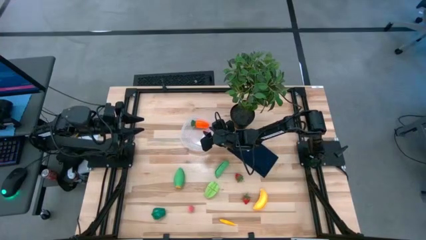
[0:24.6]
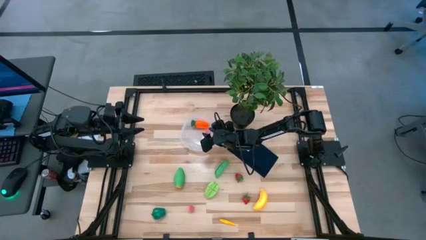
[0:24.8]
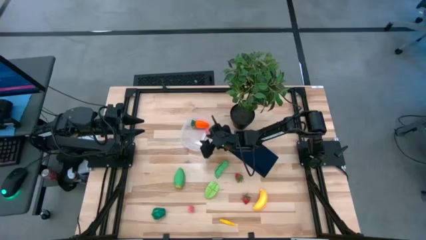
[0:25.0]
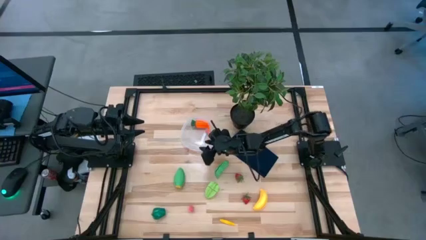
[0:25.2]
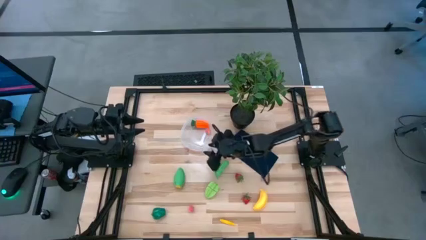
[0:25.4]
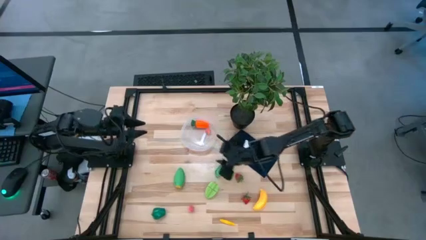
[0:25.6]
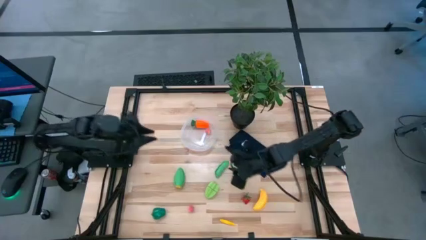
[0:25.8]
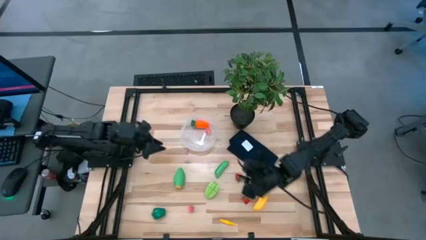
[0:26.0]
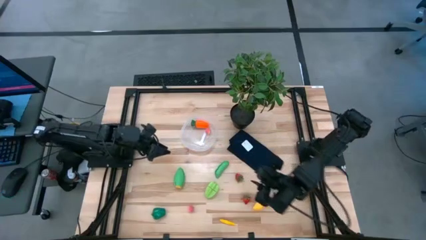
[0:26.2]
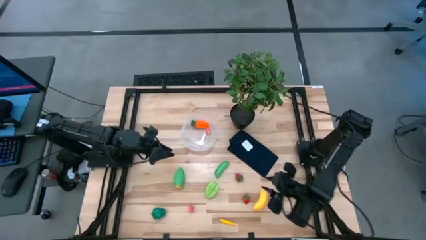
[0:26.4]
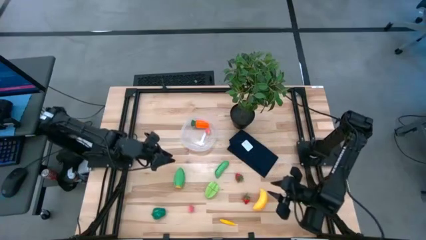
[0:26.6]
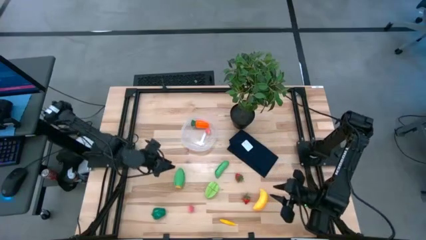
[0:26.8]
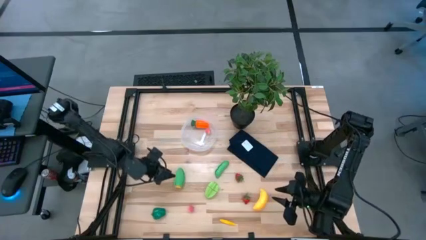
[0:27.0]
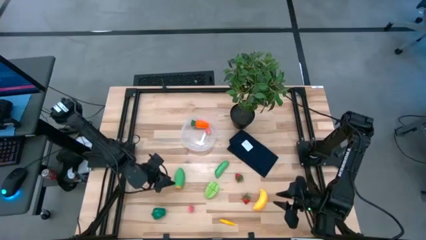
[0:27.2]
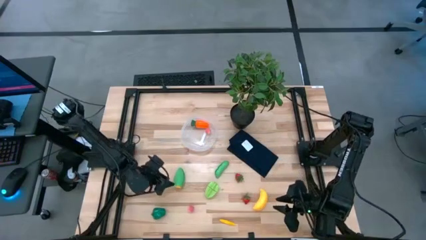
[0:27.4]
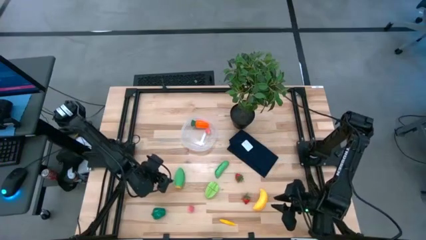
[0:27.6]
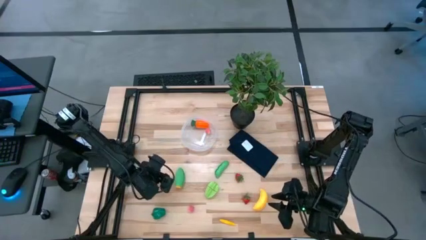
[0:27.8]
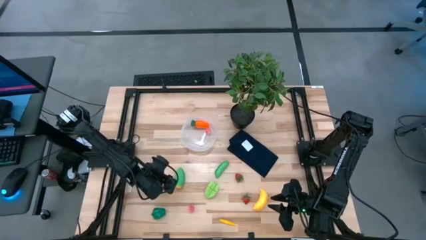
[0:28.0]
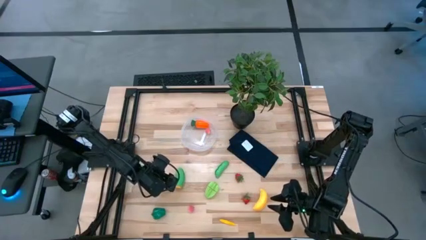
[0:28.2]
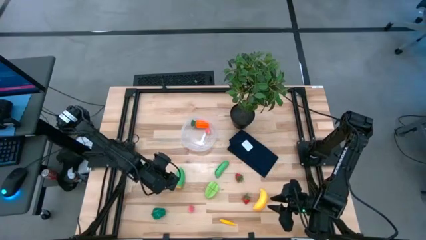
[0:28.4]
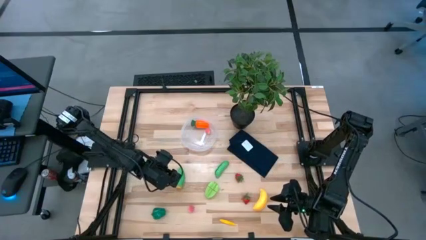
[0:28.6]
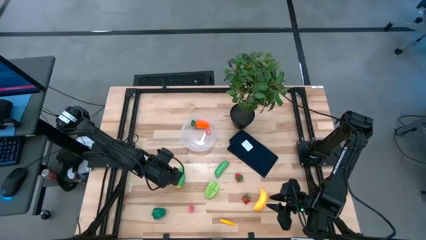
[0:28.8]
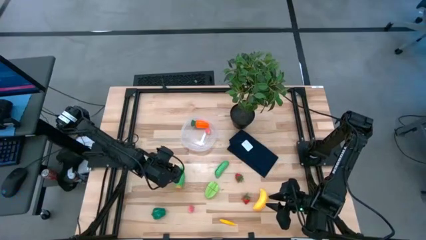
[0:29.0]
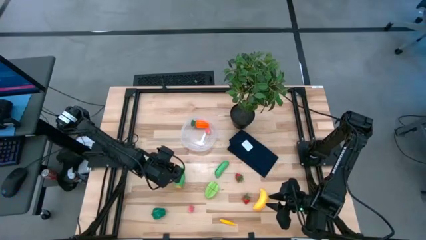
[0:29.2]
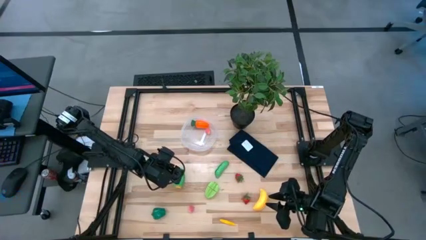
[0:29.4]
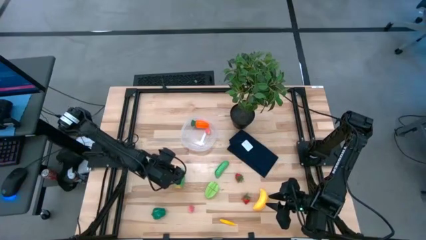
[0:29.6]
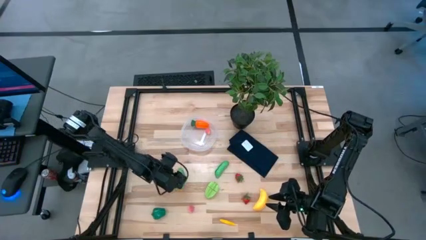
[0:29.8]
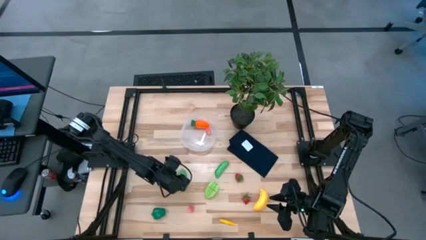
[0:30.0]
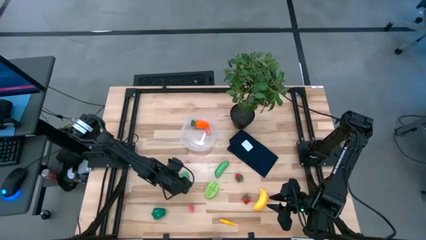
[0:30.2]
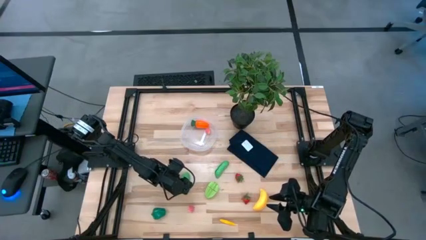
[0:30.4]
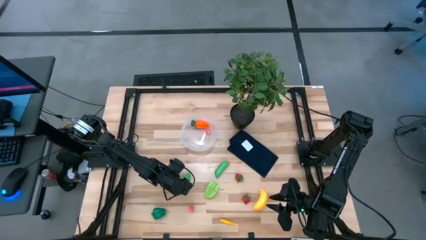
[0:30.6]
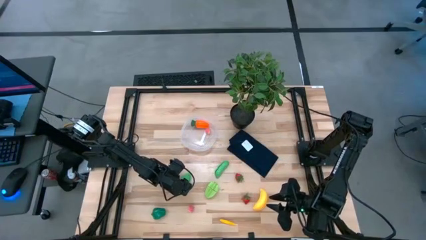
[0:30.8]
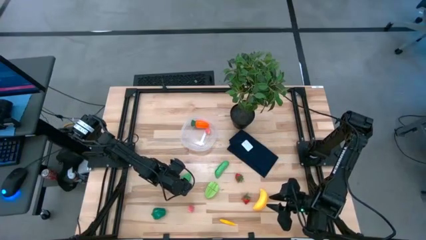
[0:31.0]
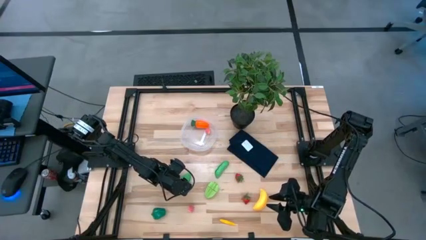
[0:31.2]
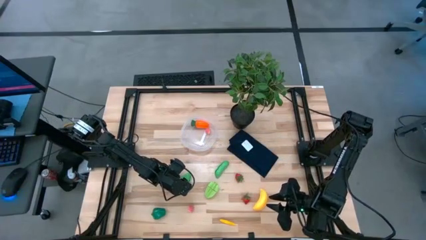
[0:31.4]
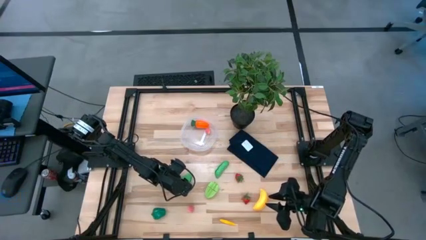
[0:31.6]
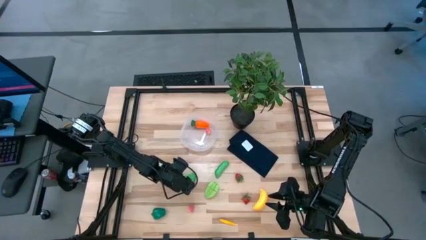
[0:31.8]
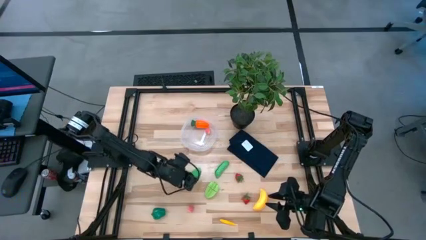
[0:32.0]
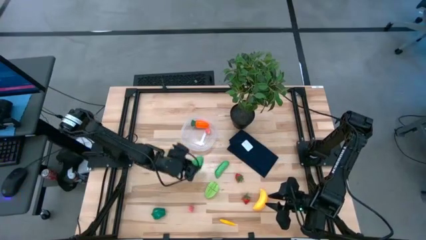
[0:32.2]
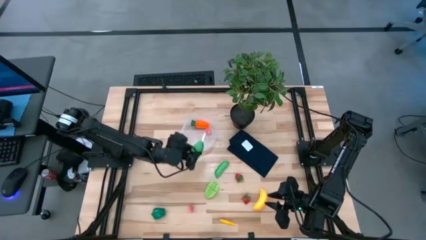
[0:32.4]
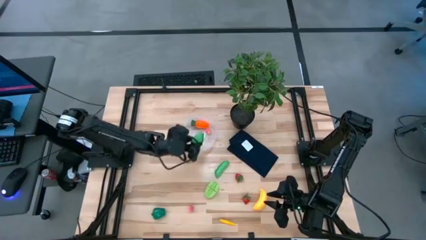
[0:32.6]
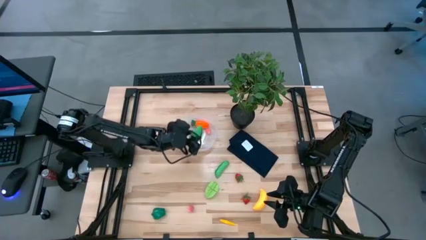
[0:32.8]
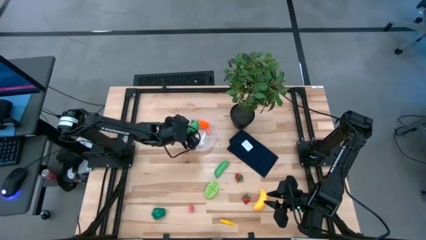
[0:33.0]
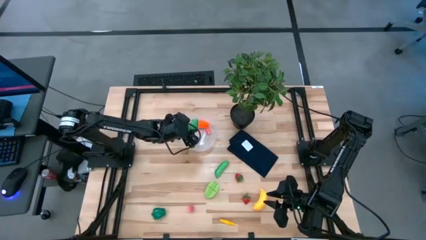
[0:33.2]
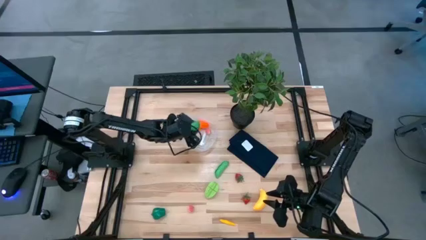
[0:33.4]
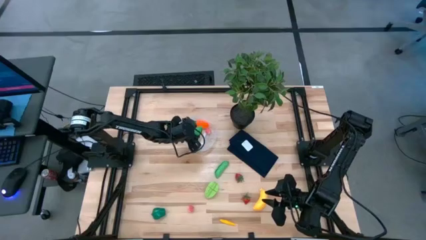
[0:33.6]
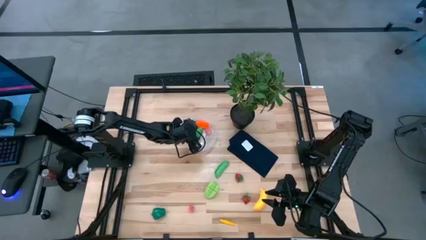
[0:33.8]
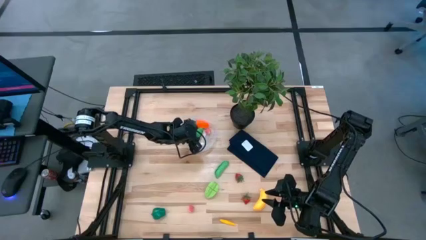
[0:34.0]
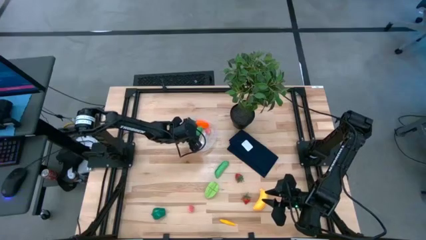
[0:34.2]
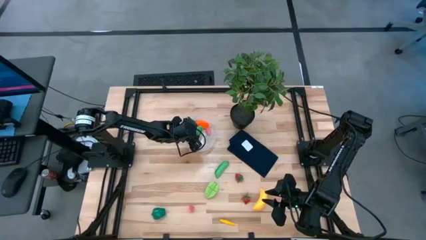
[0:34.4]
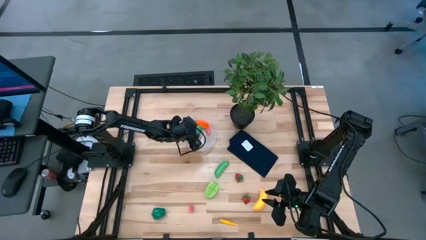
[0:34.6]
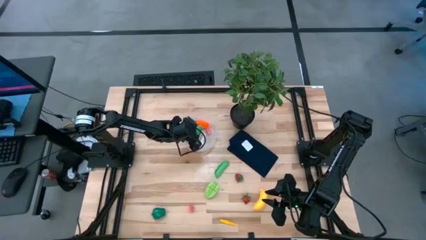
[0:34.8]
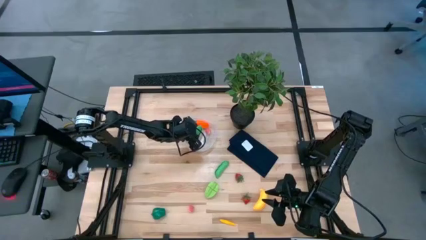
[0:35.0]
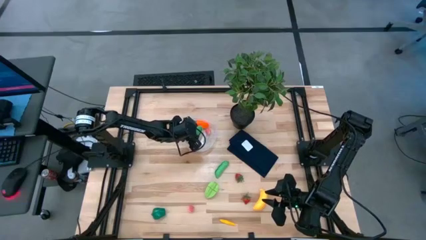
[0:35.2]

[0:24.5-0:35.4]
Task: Pick and placing Produce into tupperware
Put the green corn into the transparent bin

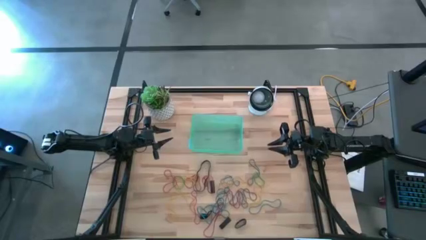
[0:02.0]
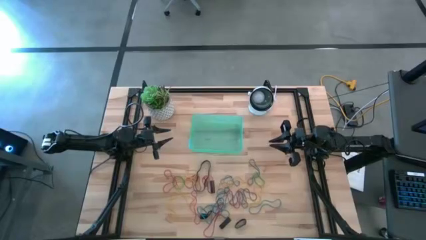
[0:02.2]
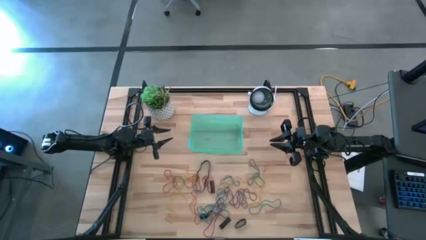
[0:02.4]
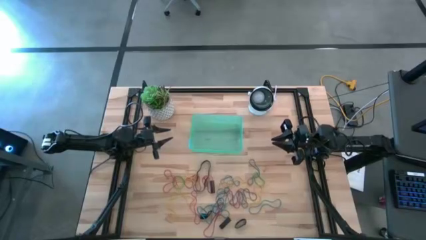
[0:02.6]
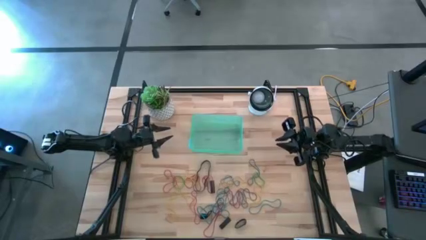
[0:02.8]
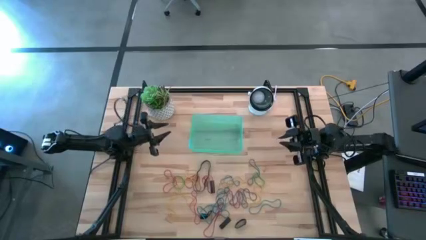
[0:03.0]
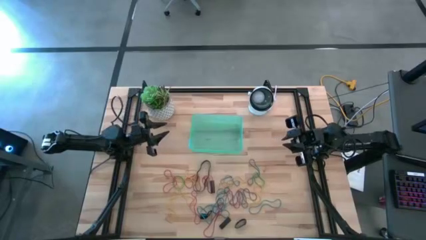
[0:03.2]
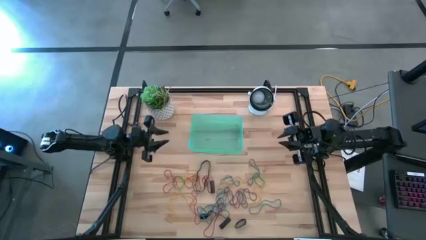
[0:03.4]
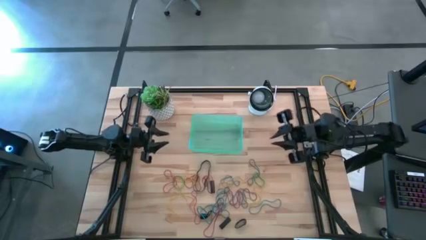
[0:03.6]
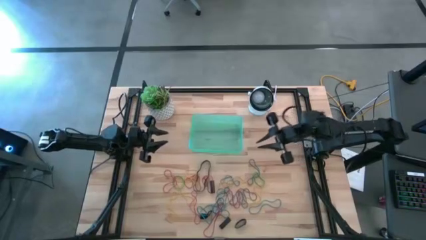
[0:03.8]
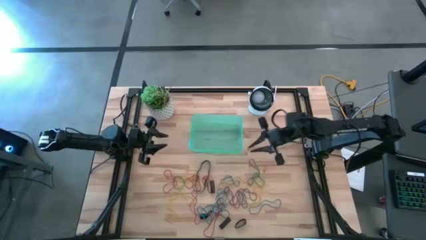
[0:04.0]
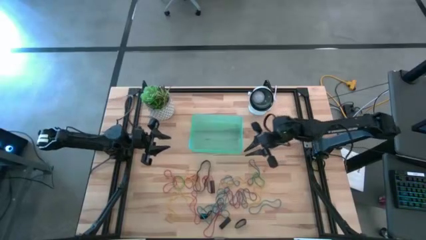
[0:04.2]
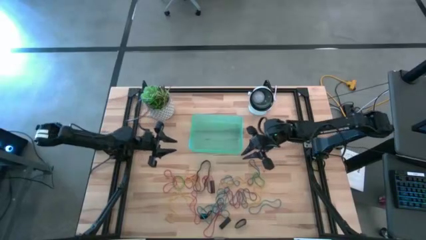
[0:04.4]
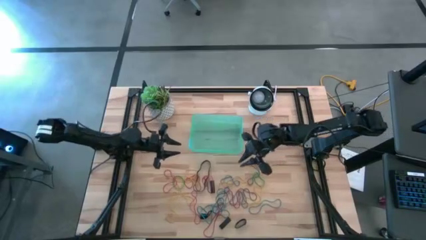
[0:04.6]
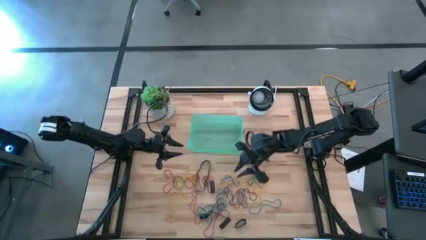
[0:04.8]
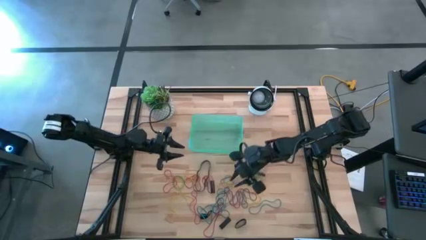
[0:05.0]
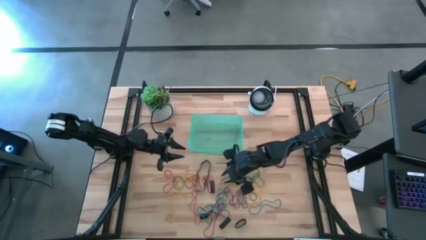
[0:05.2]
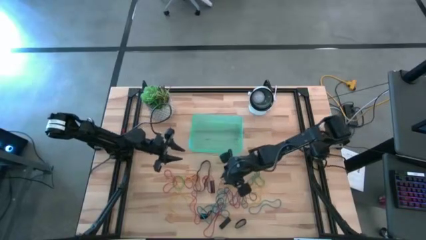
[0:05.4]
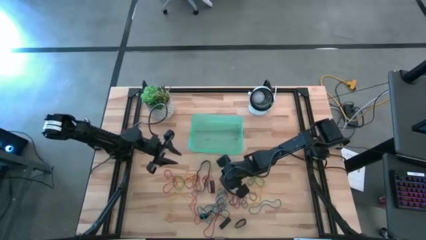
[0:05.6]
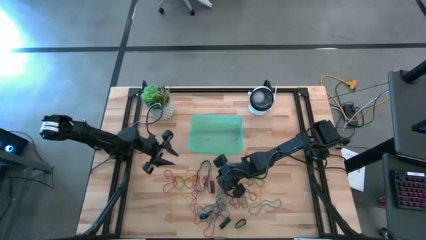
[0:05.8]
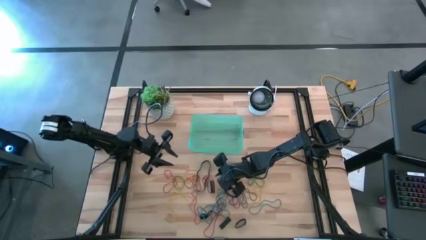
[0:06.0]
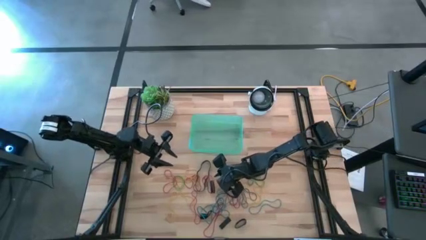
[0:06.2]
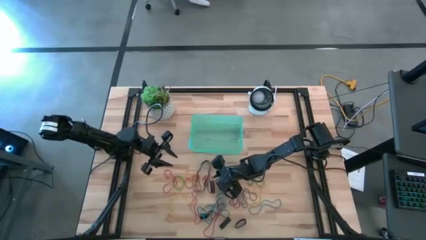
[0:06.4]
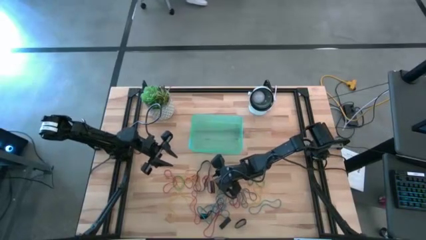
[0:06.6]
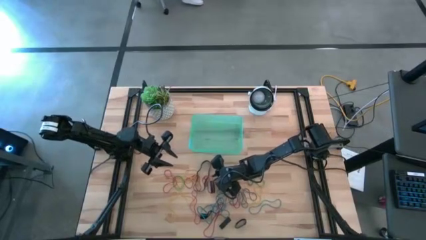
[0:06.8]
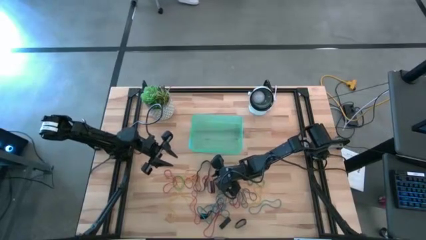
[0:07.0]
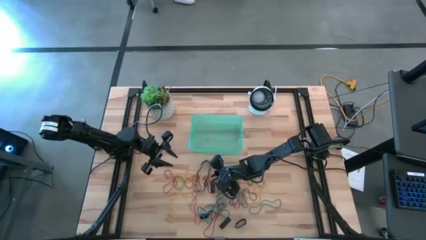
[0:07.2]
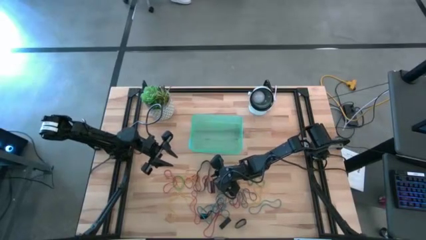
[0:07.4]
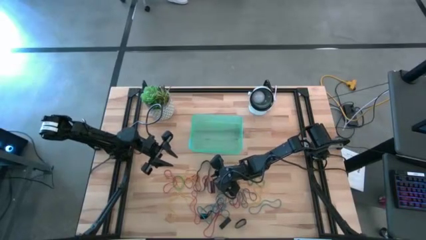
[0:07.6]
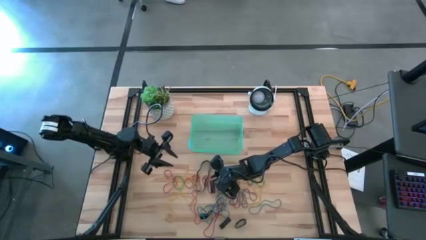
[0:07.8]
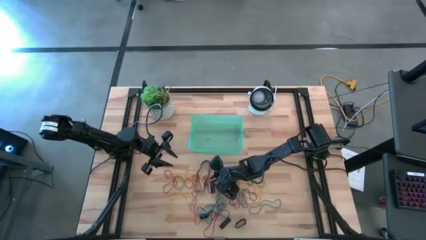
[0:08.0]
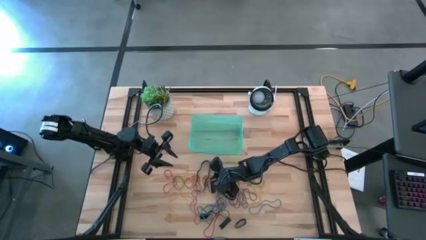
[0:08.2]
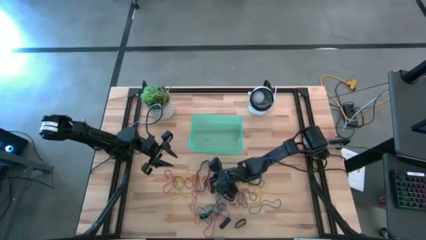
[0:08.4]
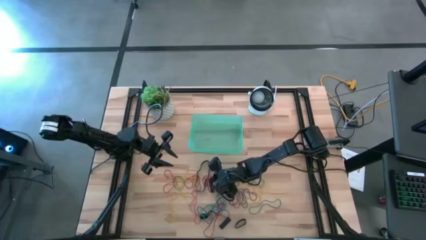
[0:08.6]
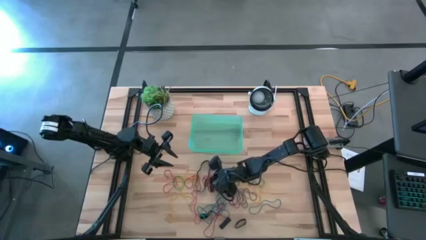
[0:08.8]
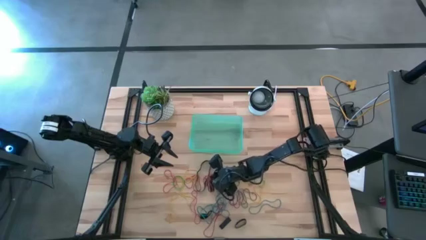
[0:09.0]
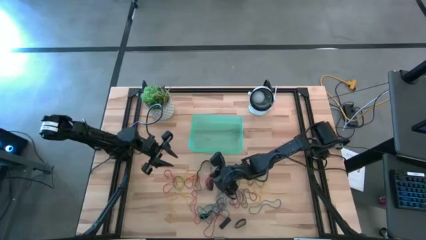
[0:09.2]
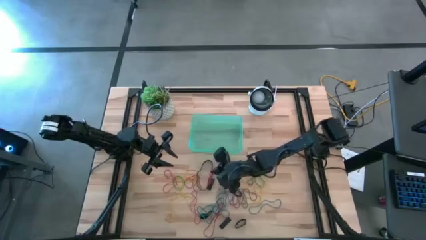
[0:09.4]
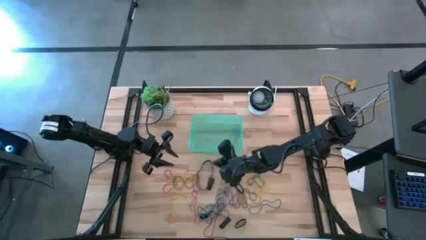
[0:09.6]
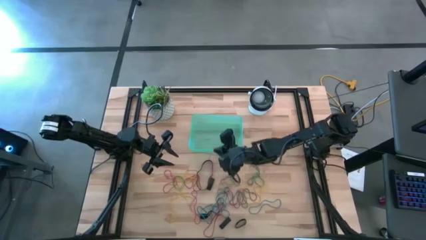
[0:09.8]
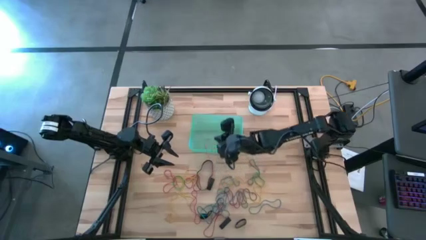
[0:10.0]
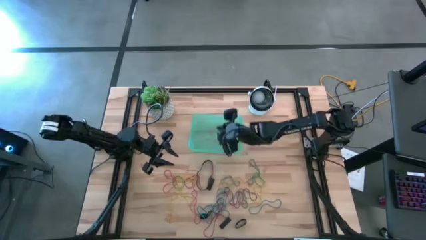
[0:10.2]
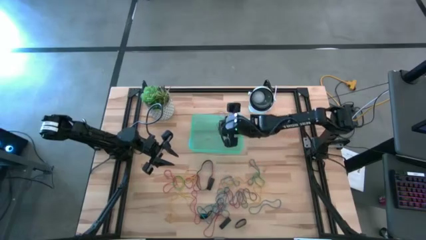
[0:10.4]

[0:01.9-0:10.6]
Task: Pick and place rubber bands into bin
Put the red rubber band into the green bin
